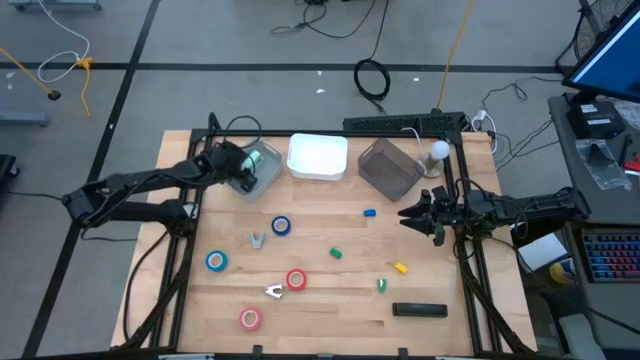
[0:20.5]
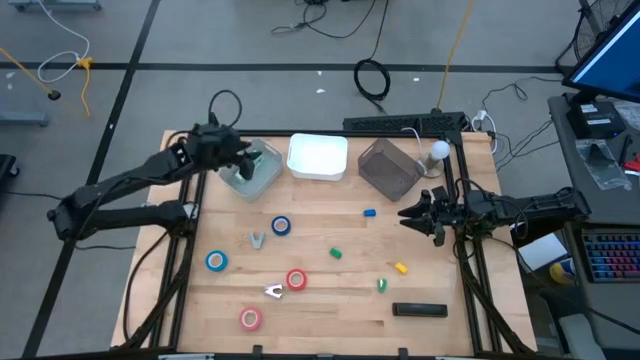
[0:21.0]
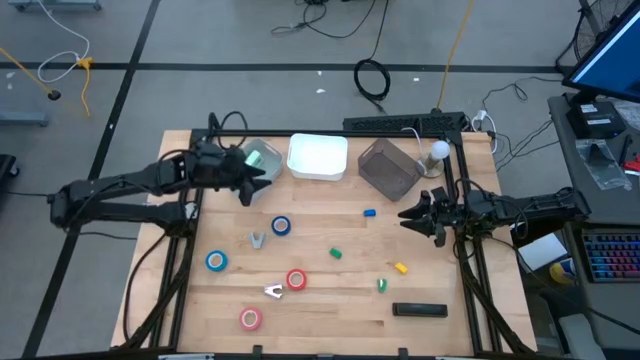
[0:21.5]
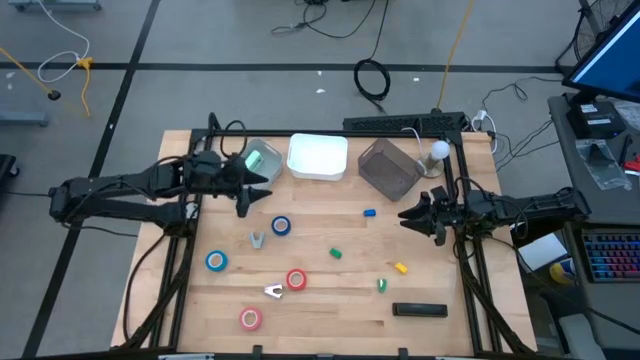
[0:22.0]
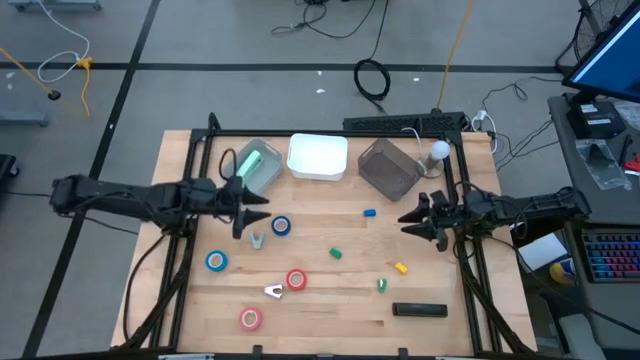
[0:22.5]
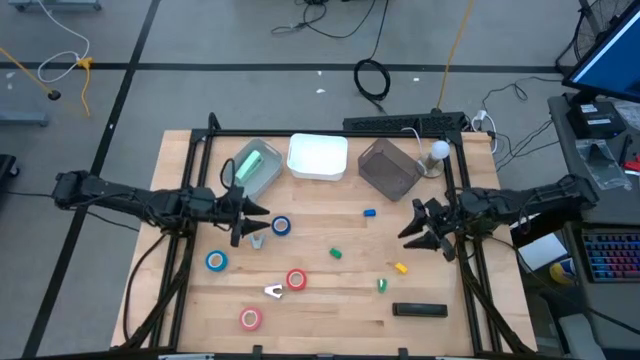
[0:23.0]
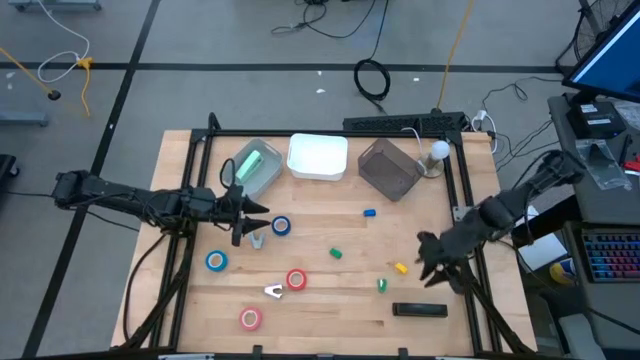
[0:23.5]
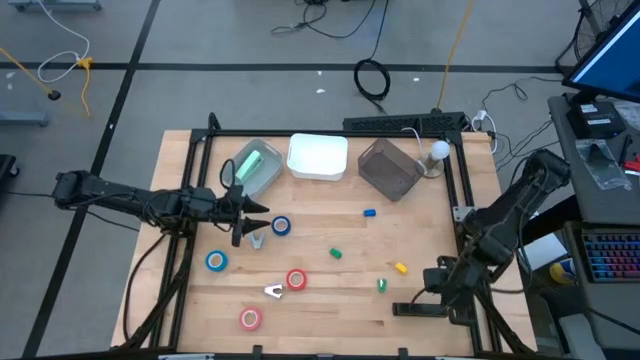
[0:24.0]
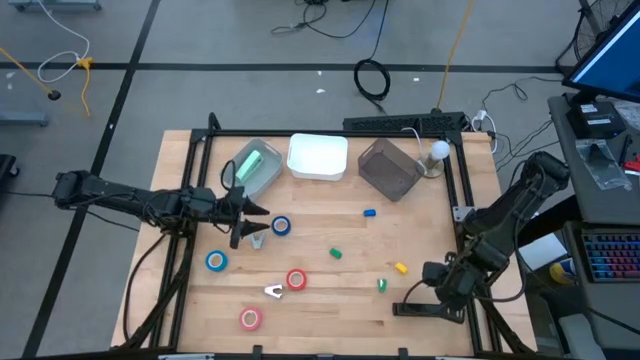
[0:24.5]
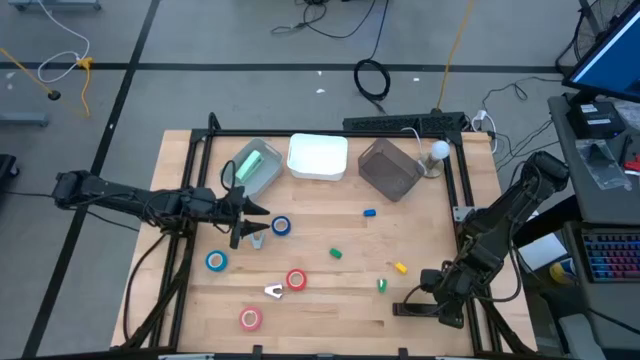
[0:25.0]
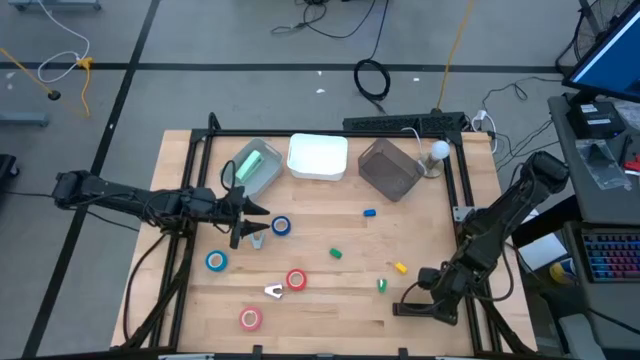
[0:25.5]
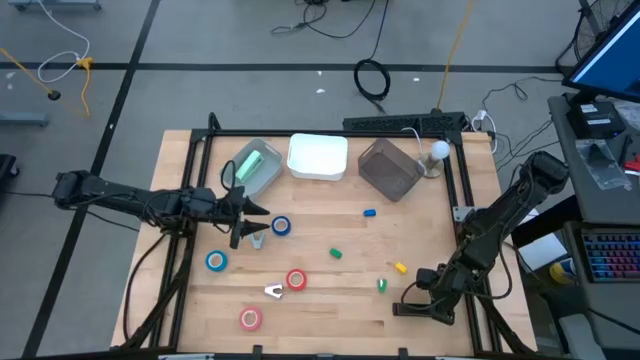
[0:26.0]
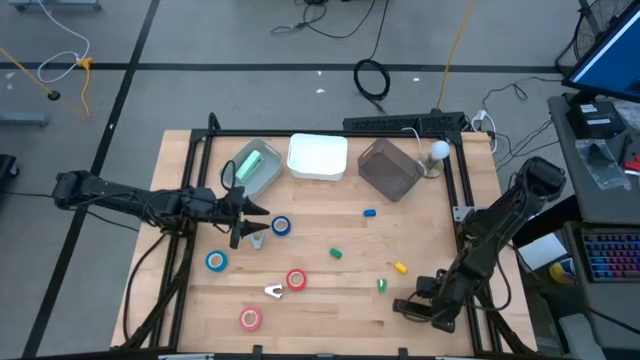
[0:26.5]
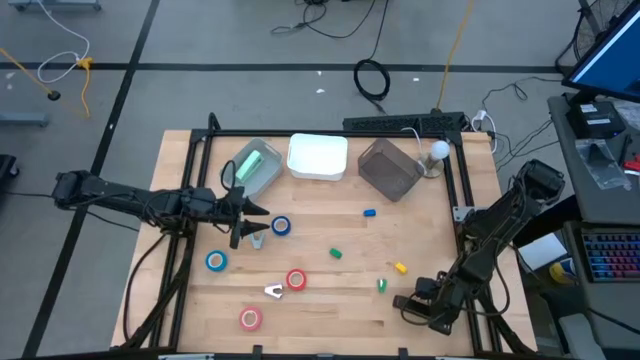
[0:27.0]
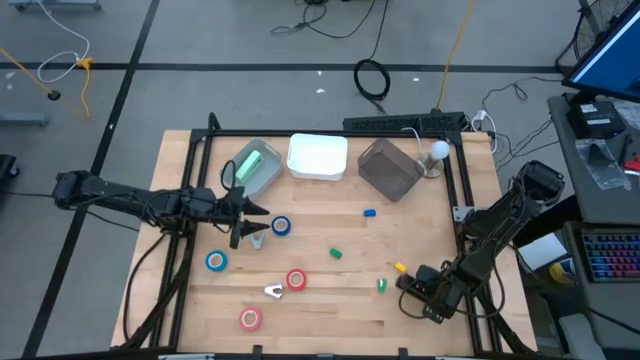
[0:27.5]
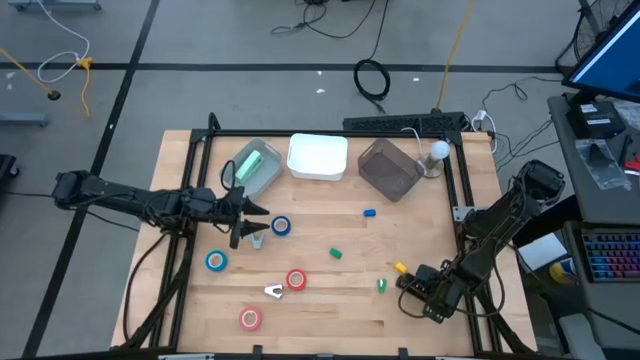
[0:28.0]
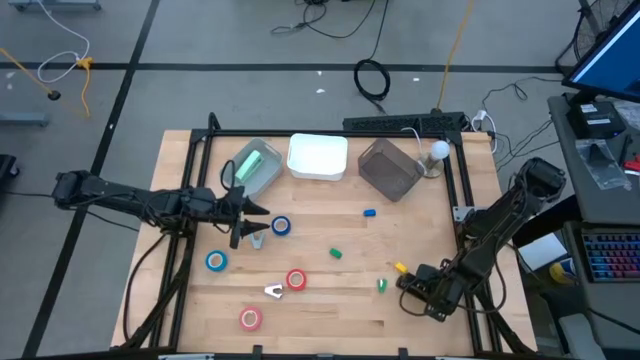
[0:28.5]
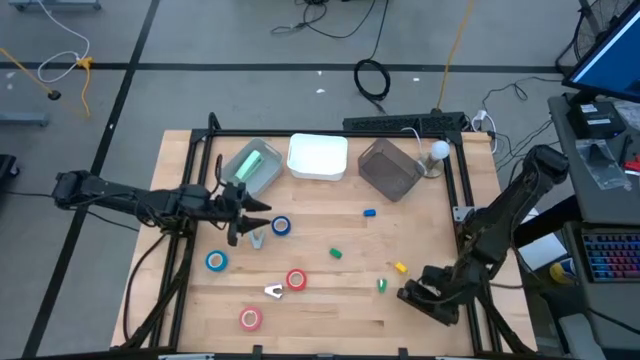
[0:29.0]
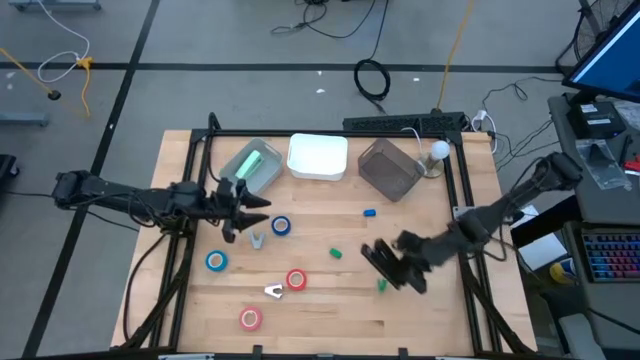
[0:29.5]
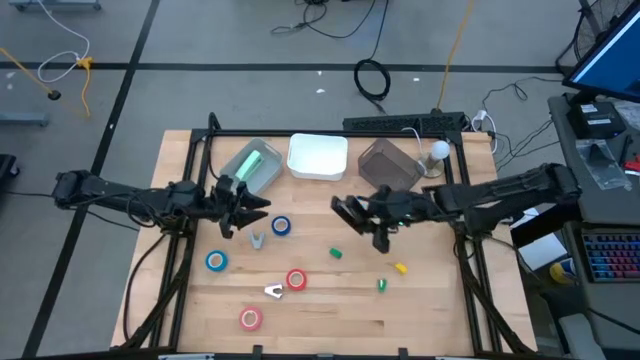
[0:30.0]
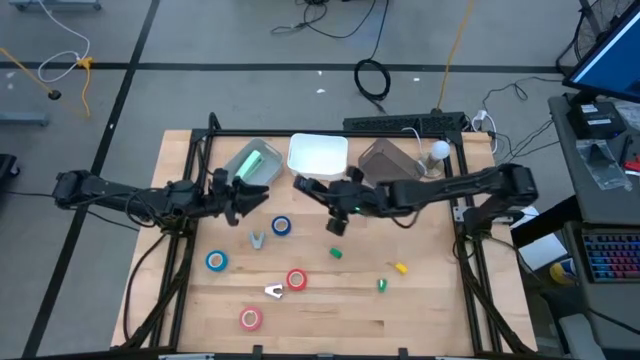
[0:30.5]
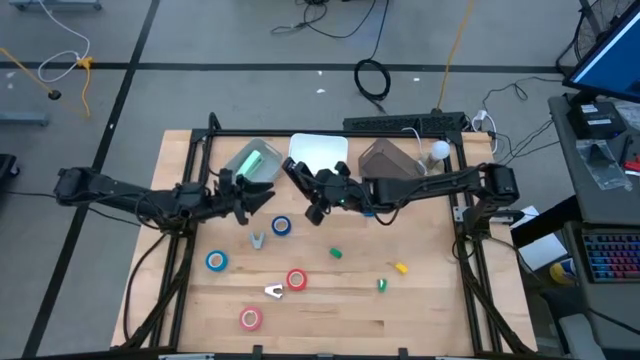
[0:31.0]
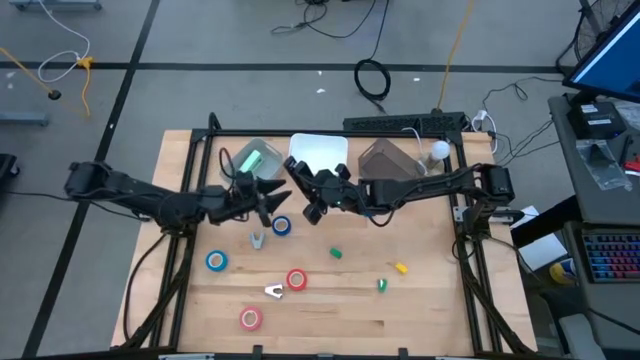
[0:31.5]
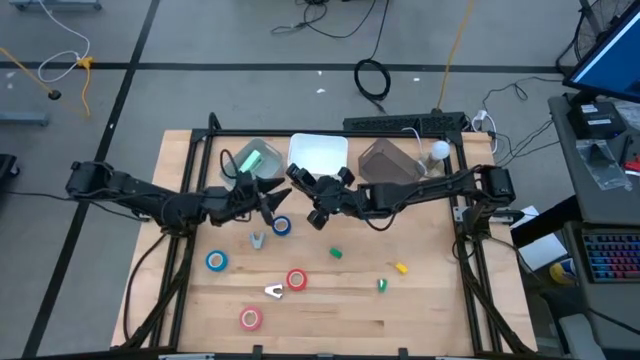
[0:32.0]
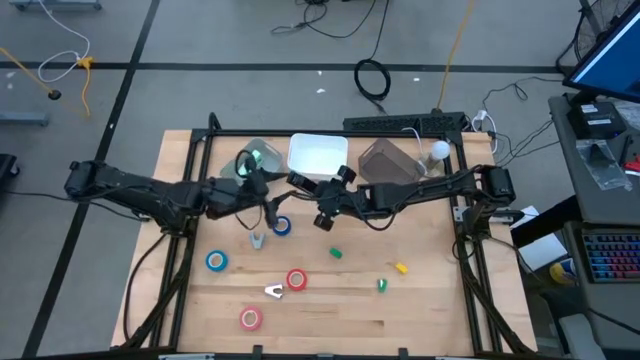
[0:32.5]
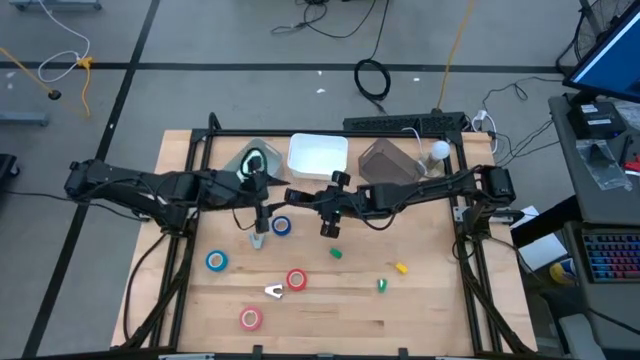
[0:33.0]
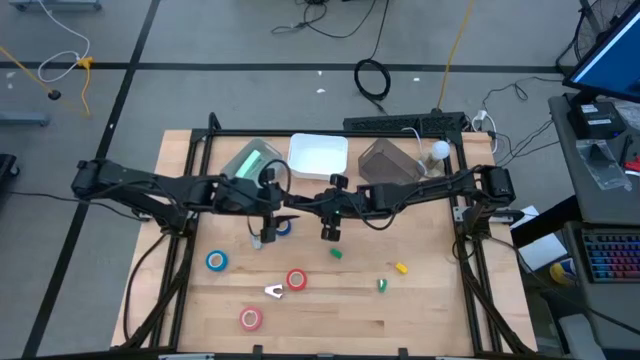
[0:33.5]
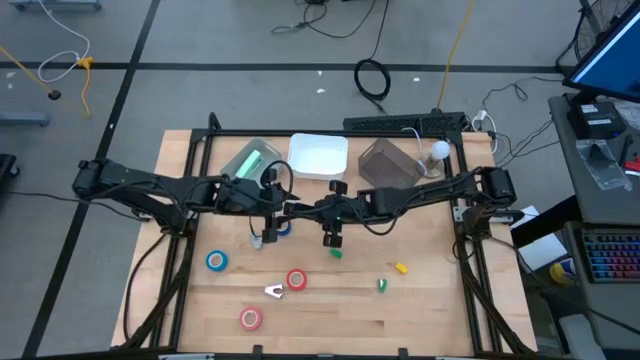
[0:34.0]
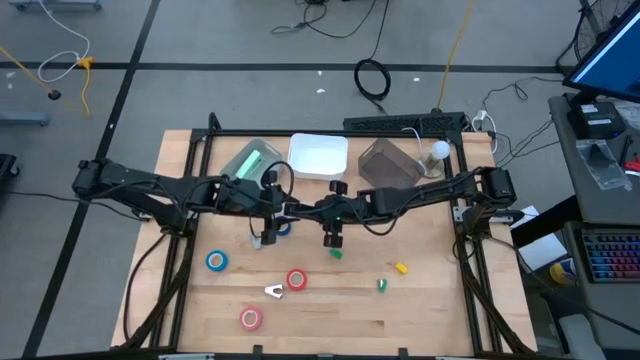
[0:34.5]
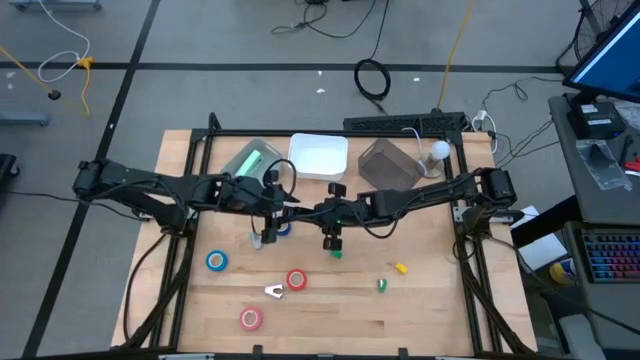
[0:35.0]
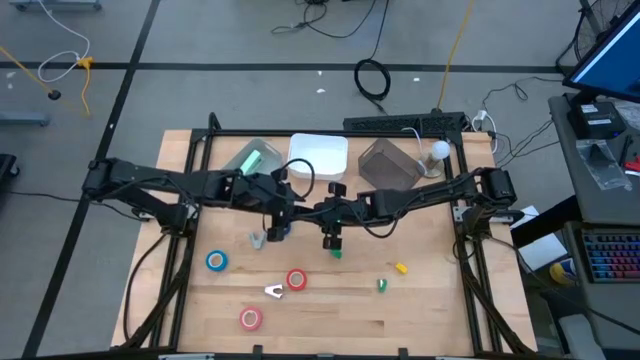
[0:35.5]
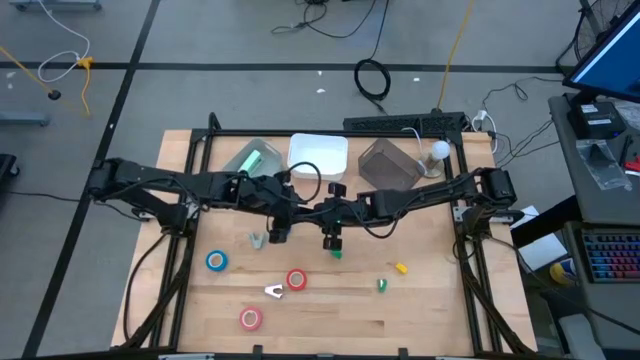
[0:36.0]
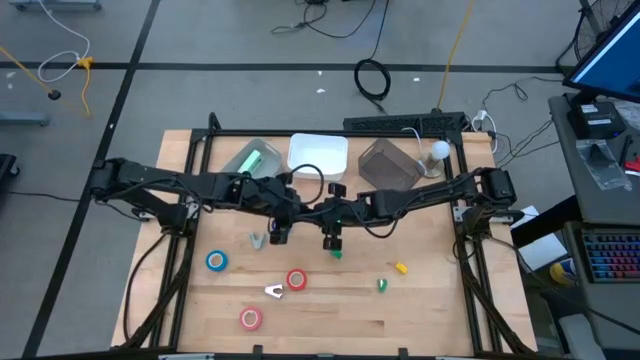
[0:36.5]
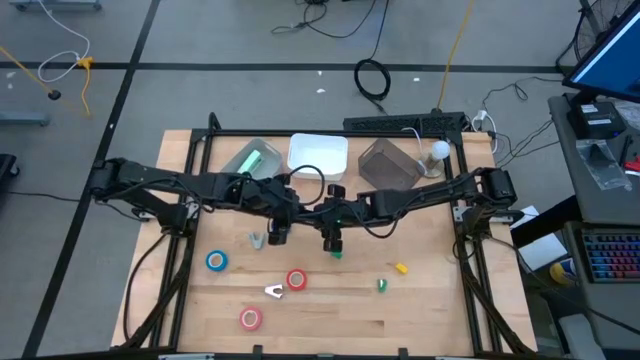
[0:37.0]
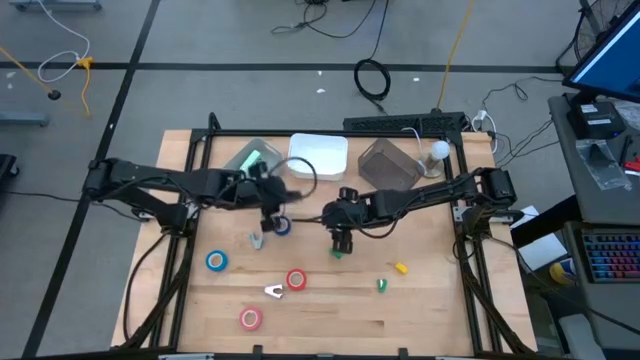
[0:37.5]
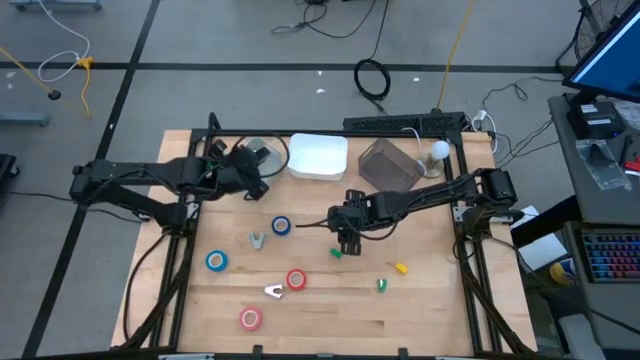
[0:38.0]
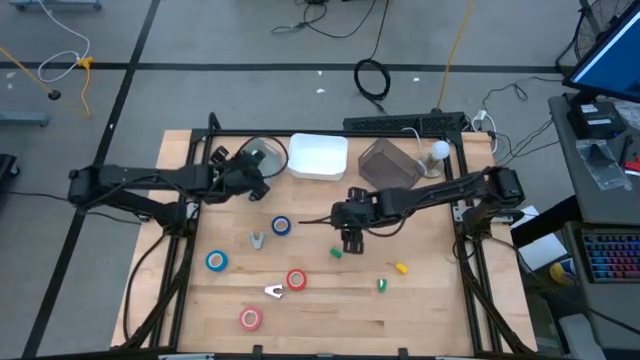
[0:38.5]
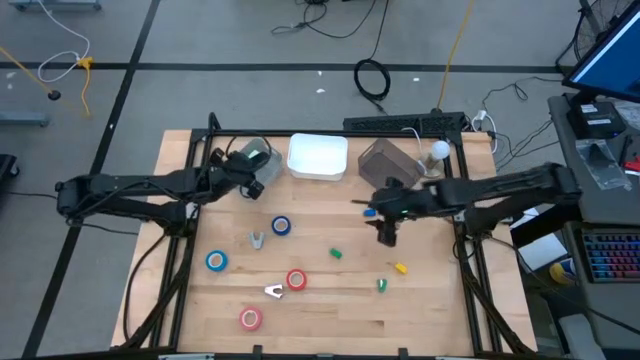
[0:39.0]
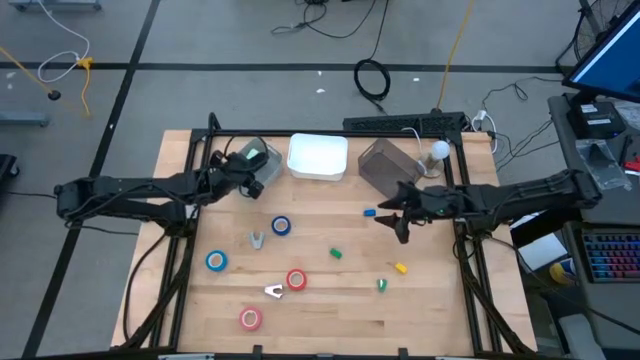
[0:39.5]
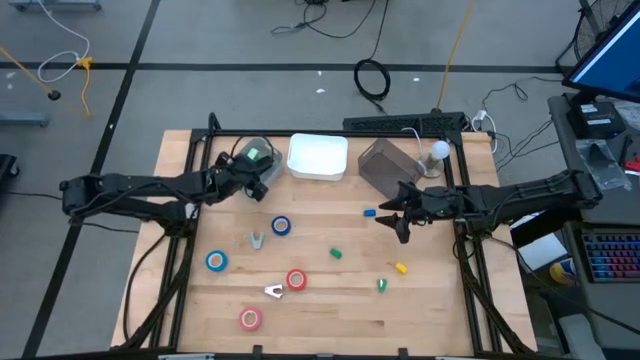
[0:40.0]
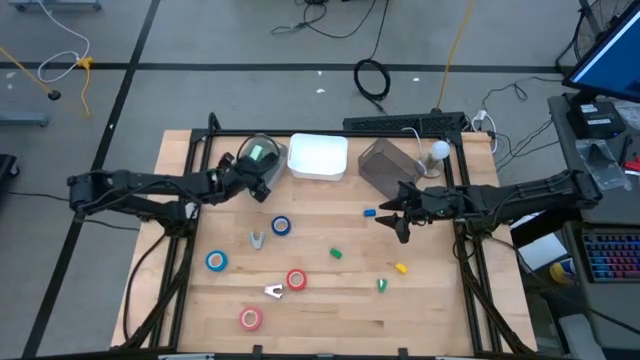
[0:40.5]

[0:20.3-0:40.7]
Task: Pick and place Stapler, Stapler remover, tape
Put the black stapler into the gray bin

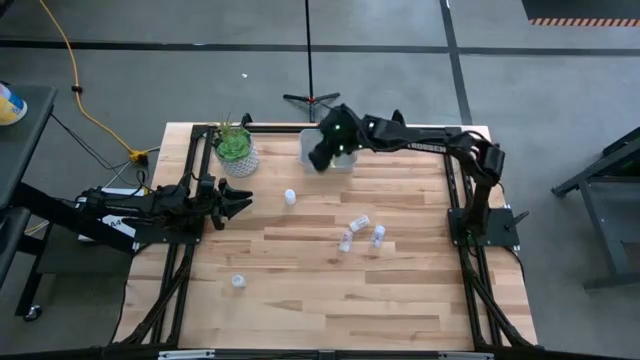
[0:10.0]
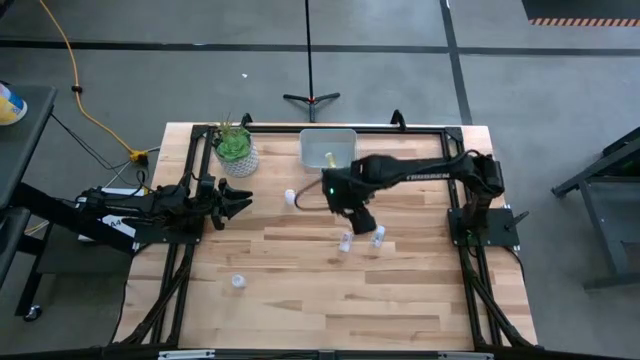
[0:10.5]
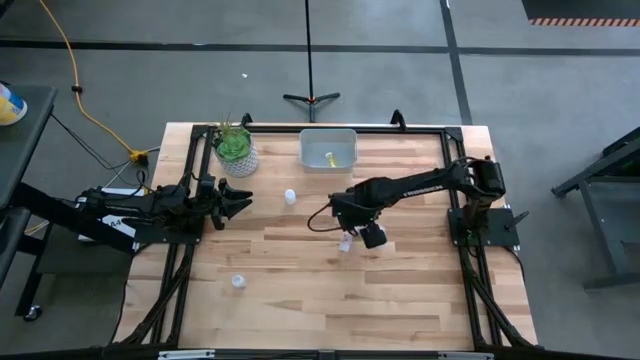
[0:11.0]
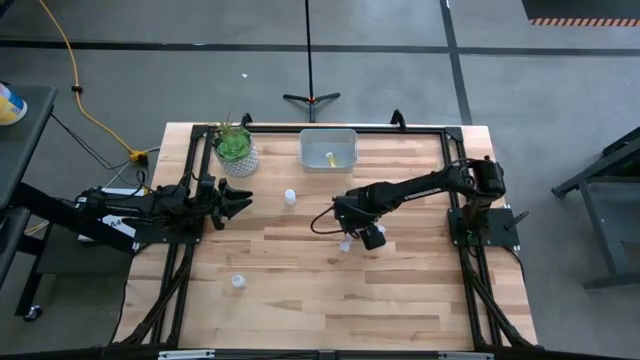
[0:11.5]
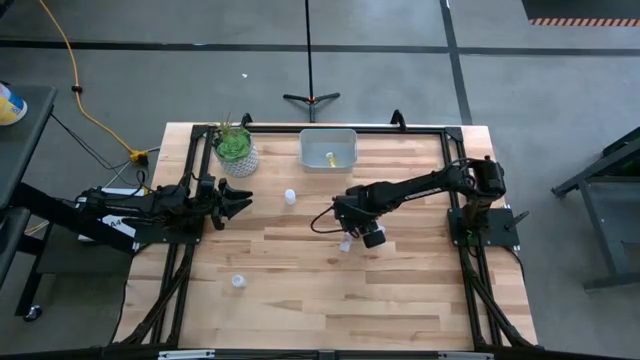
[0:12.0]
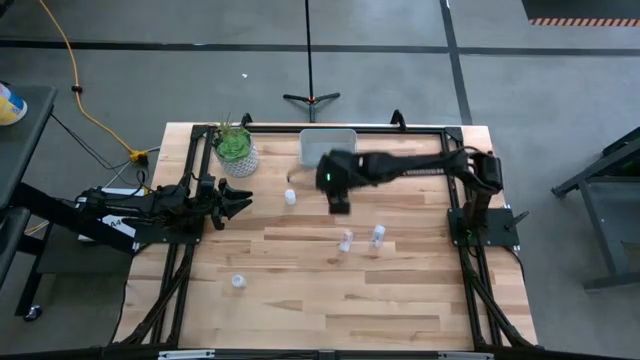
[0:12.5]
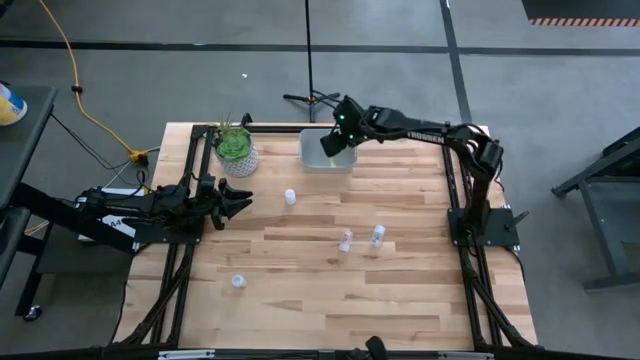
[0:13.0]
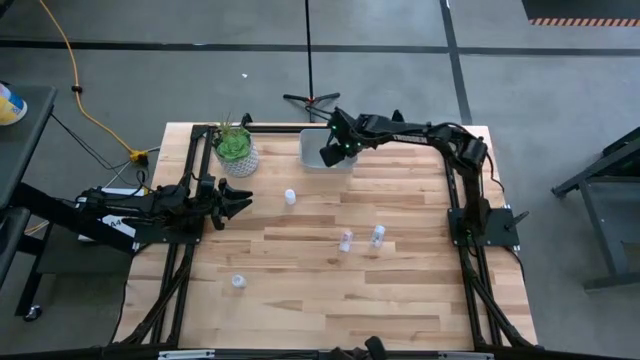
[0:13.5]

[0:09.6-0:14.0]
Task: Pick and place pill bottles into a basket
Put the transparent pill bottle into the gray bin
